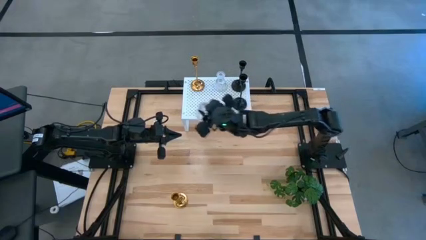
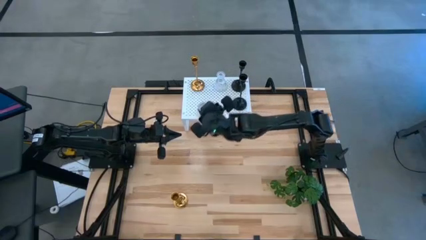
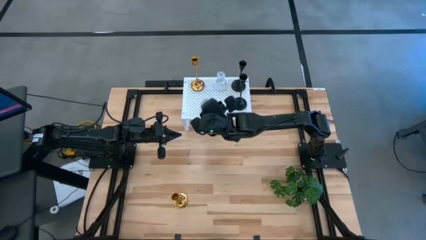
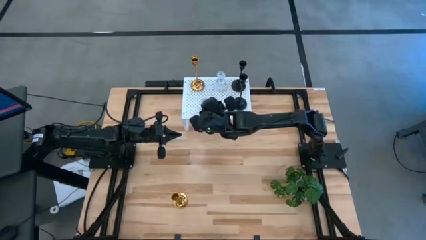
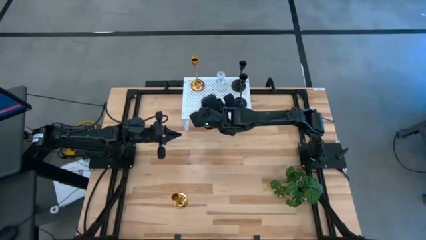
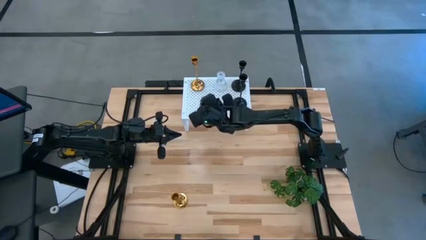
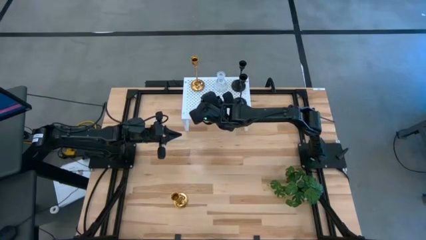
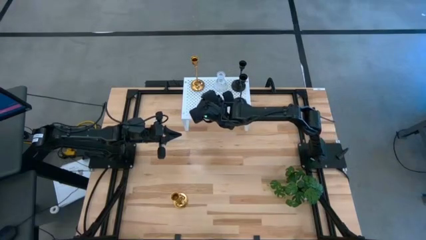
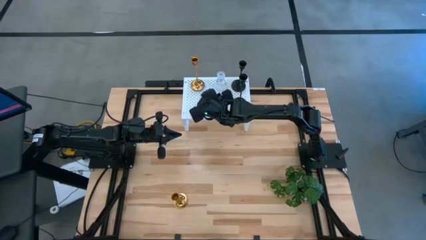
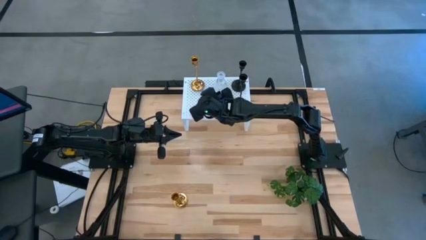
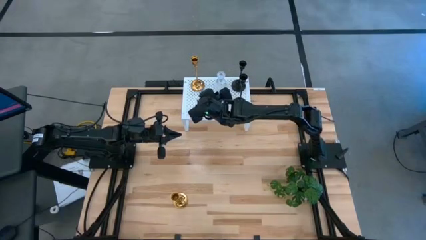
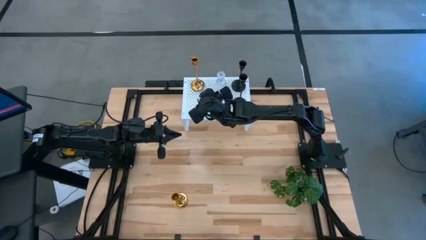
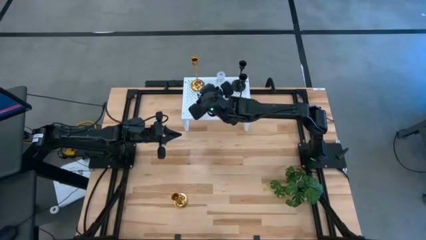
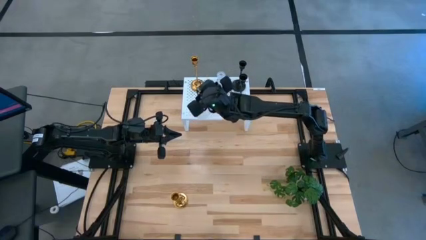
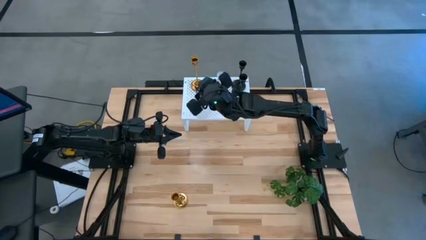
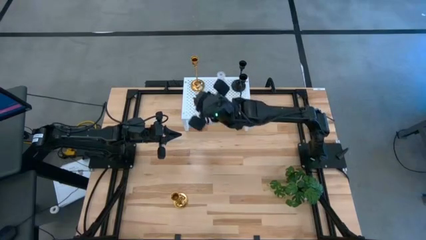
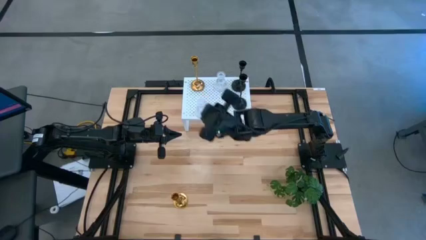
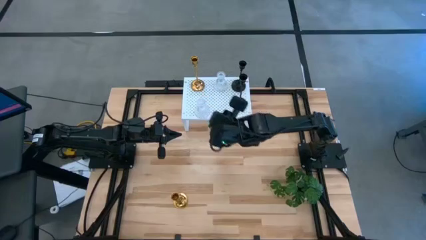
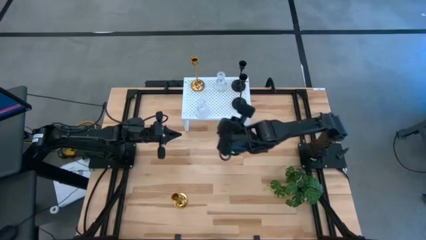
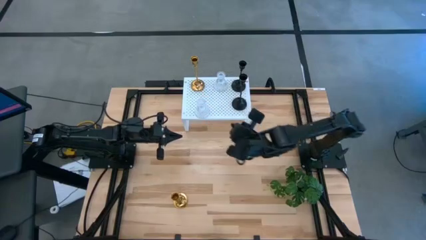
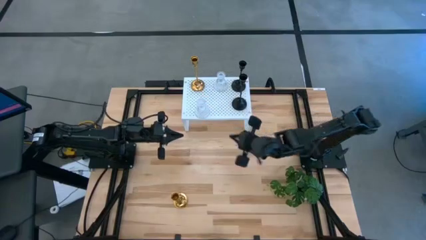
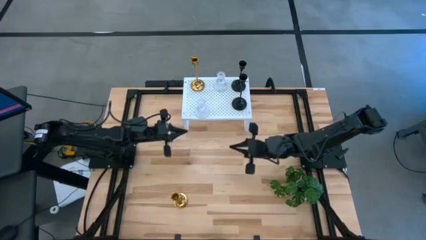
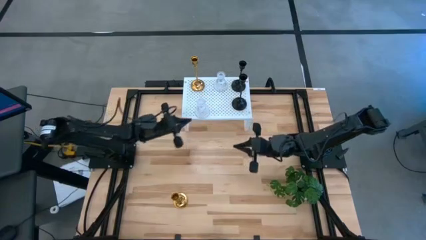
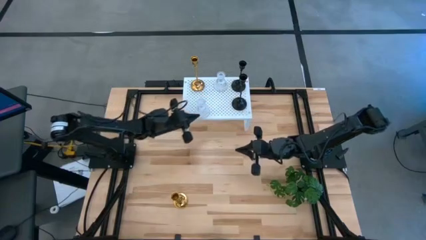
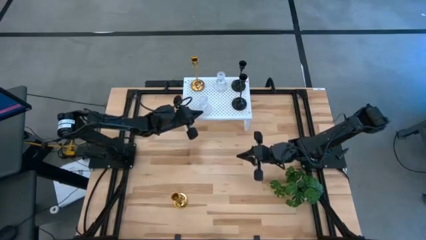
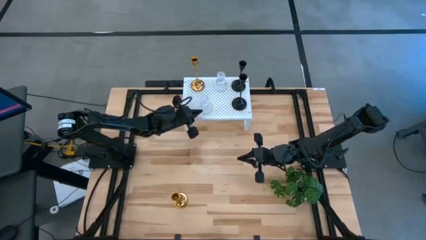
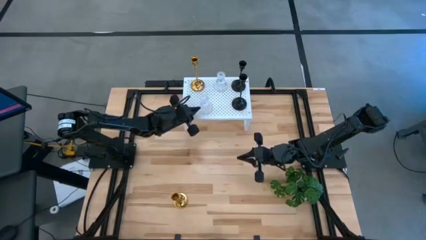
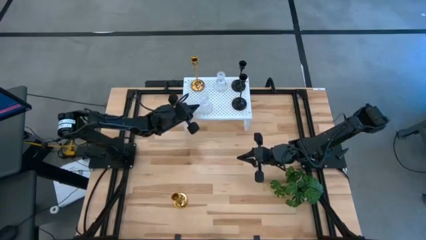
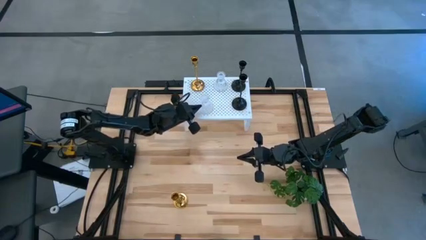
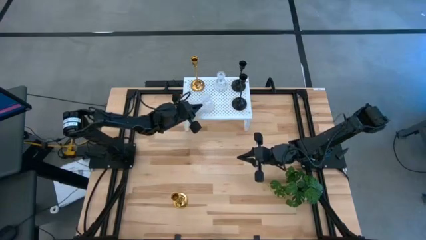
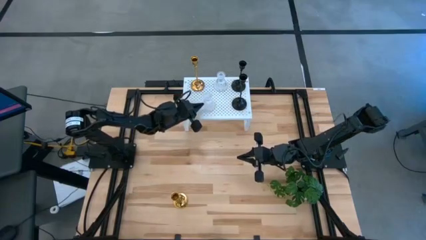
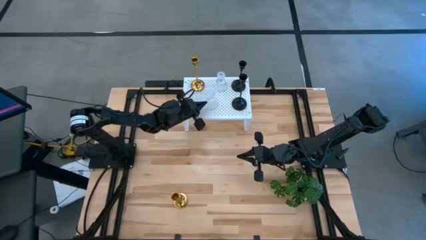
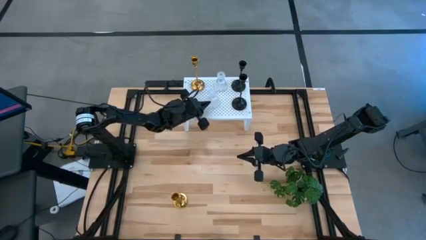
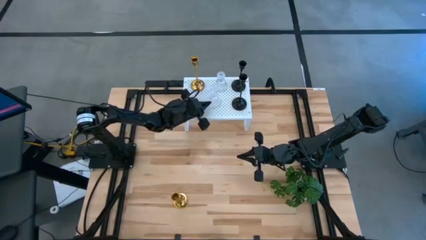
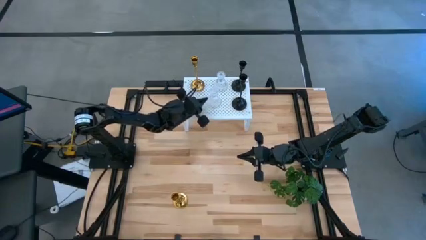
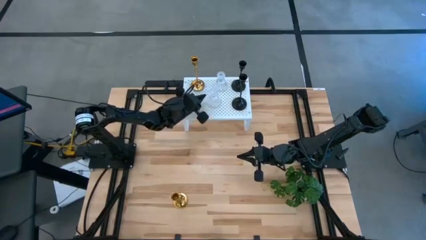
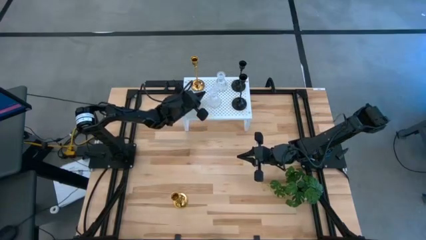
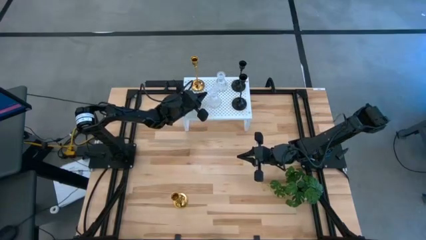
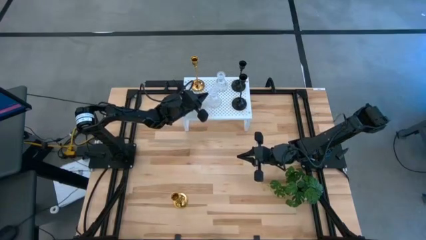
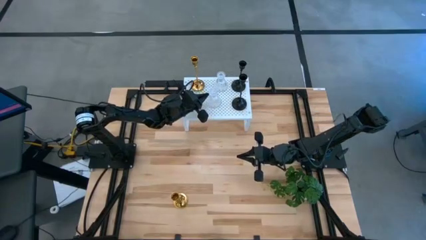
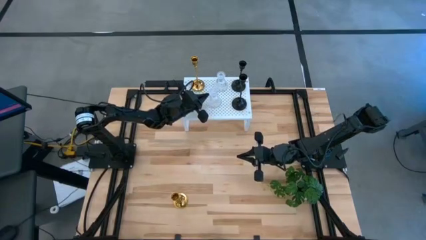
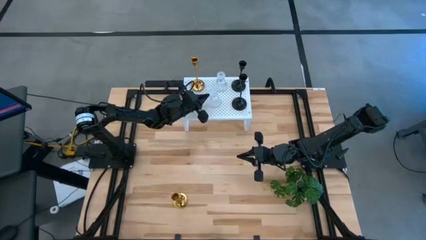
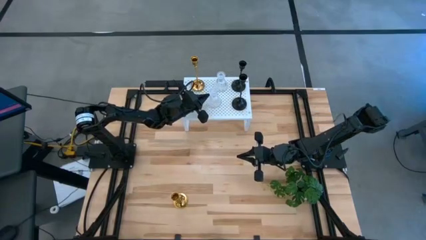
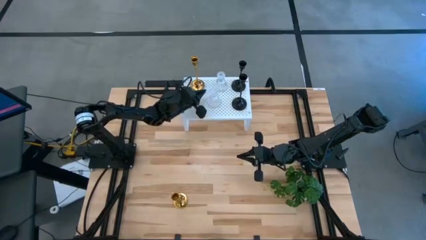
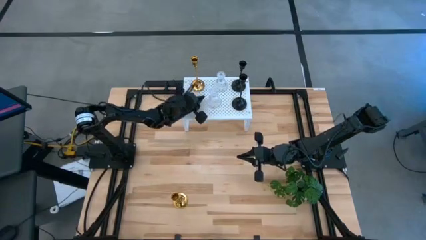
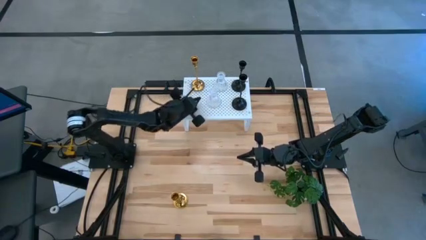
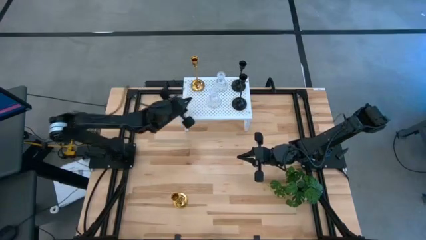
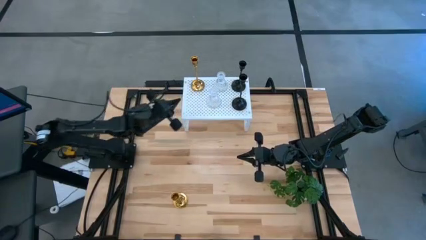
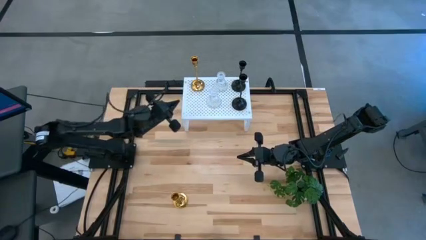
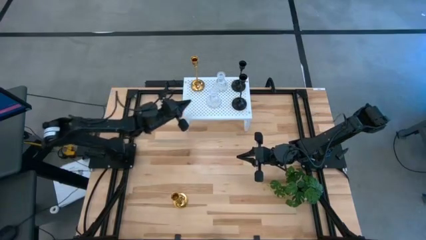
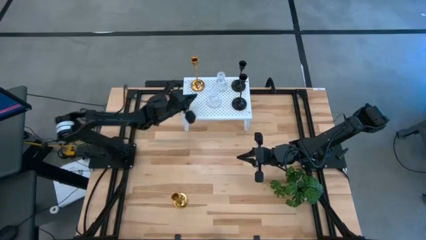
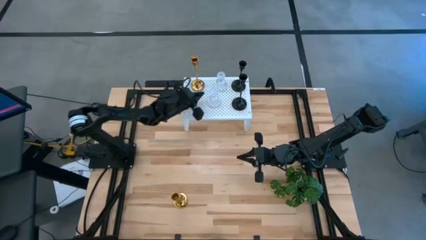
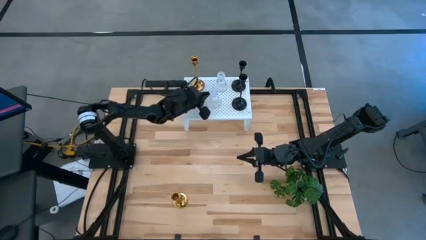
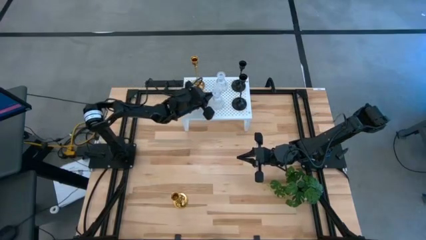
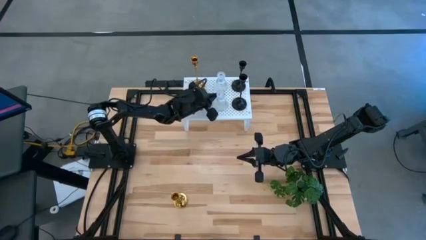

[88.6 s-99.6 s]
Task: Pick & Place candle stick holders
Put the transparent candle holder on the shelf aligned with the other transparent candle holder
